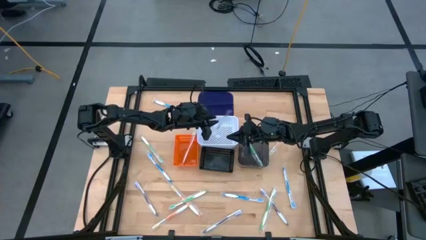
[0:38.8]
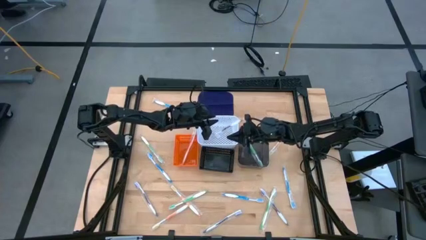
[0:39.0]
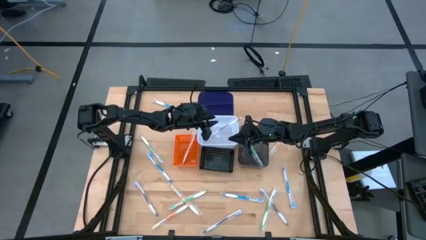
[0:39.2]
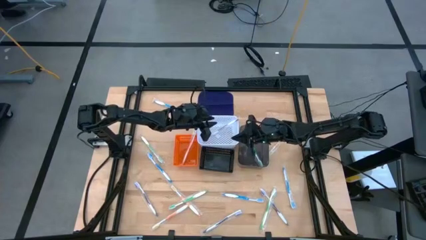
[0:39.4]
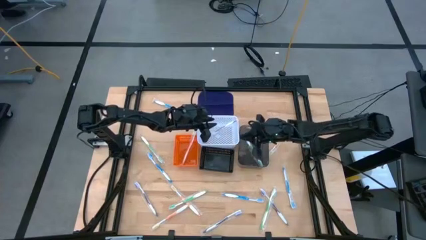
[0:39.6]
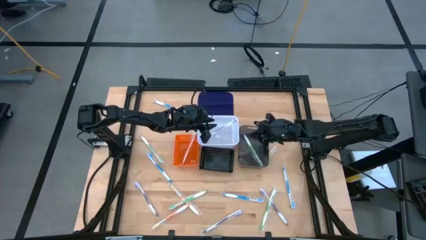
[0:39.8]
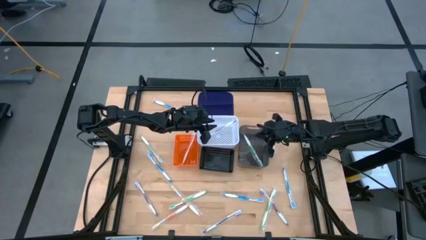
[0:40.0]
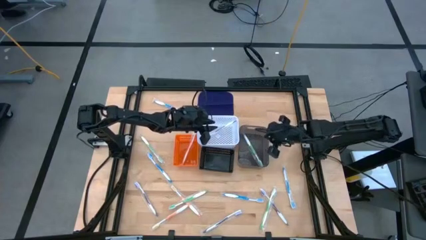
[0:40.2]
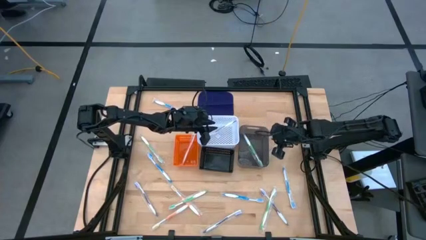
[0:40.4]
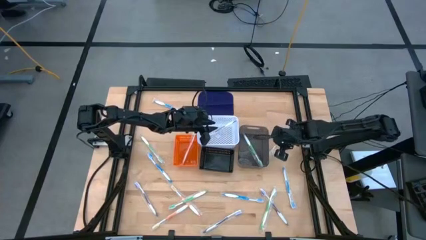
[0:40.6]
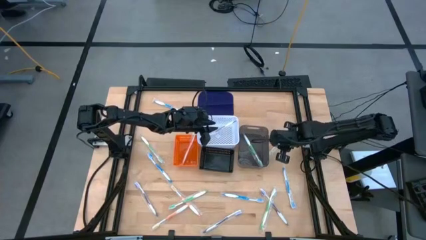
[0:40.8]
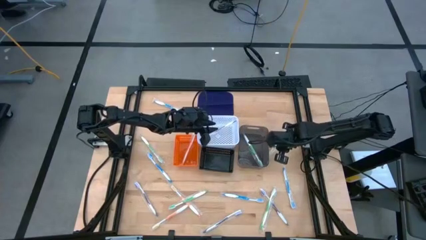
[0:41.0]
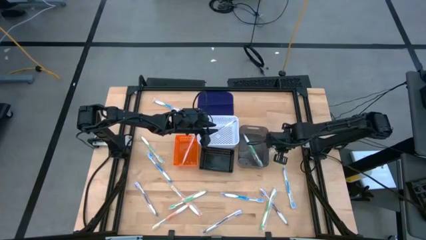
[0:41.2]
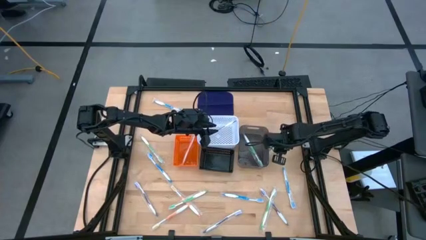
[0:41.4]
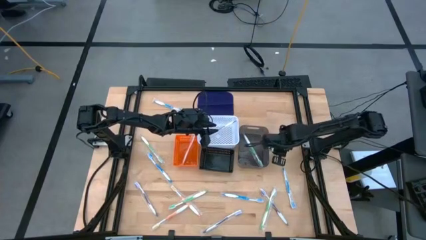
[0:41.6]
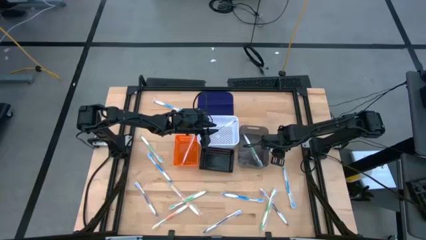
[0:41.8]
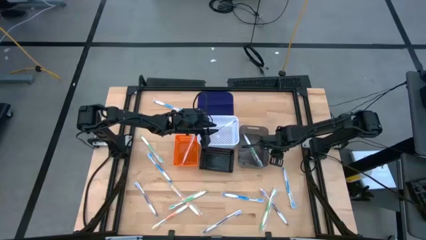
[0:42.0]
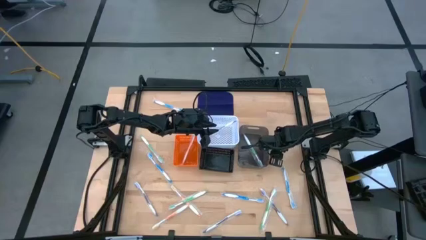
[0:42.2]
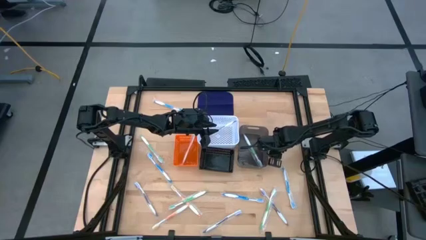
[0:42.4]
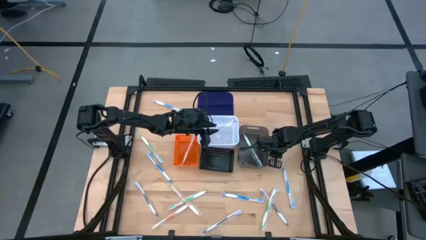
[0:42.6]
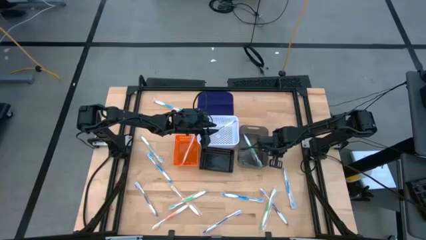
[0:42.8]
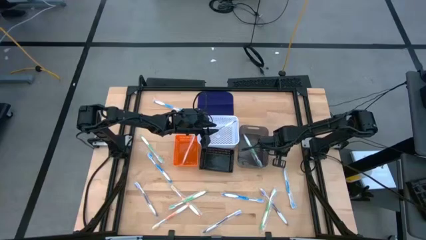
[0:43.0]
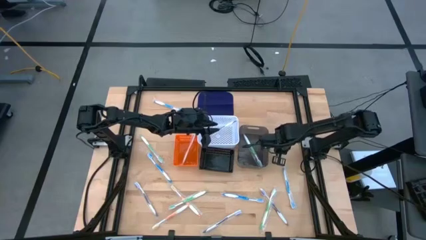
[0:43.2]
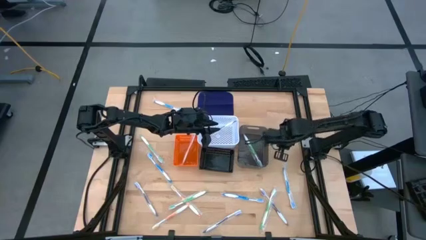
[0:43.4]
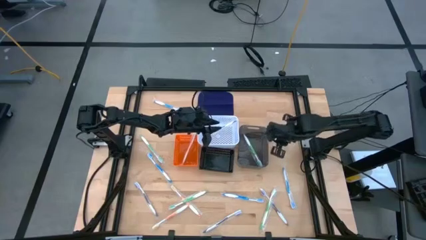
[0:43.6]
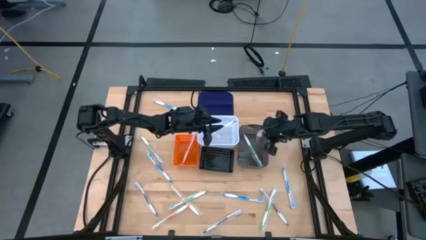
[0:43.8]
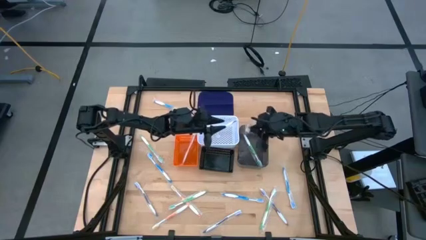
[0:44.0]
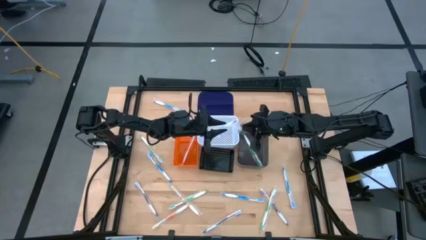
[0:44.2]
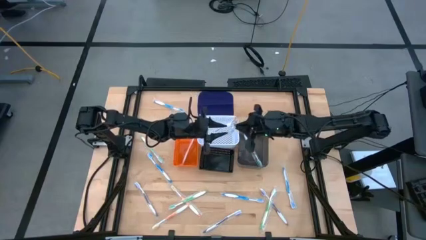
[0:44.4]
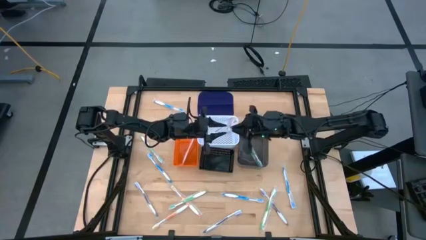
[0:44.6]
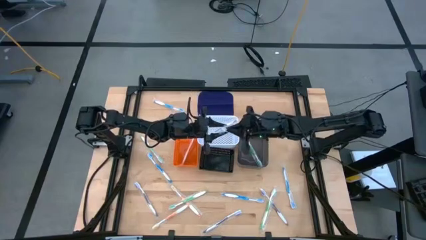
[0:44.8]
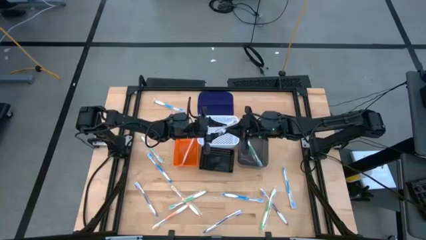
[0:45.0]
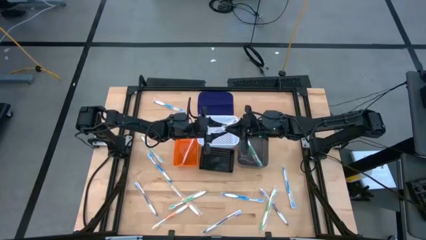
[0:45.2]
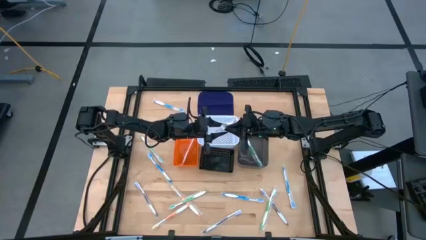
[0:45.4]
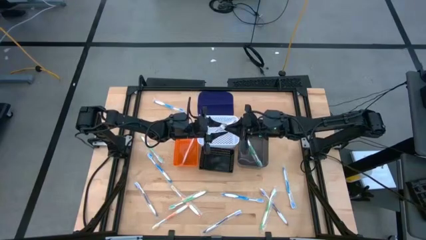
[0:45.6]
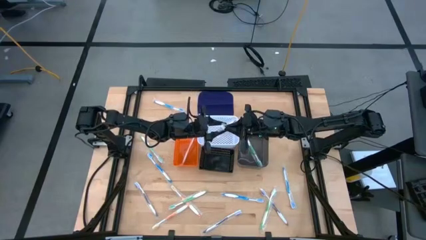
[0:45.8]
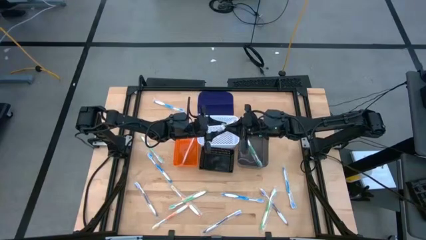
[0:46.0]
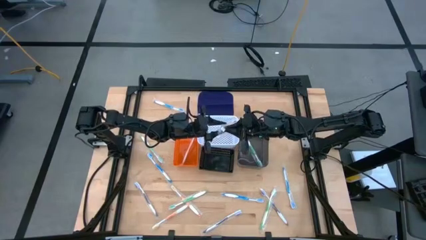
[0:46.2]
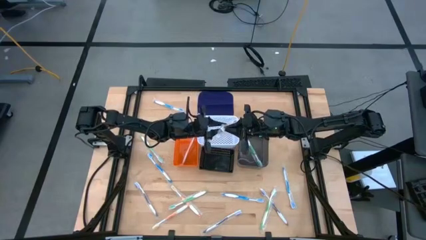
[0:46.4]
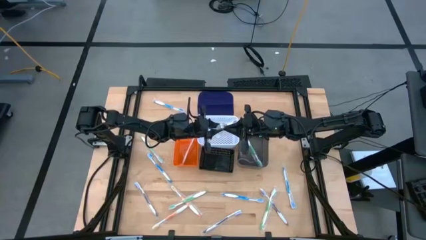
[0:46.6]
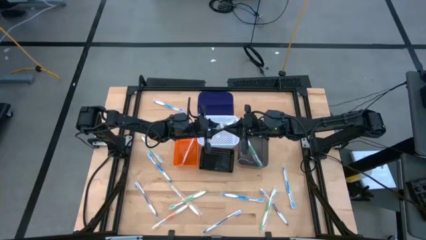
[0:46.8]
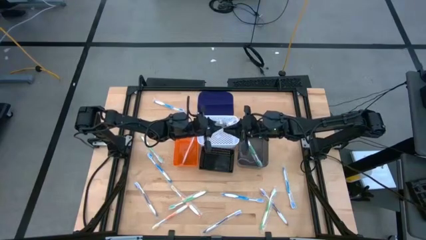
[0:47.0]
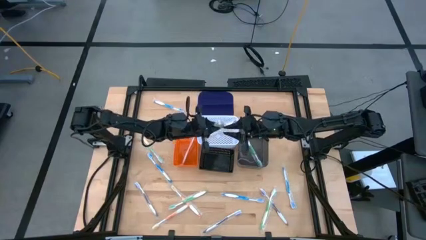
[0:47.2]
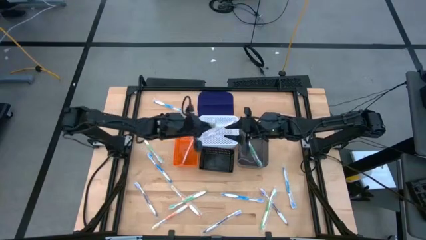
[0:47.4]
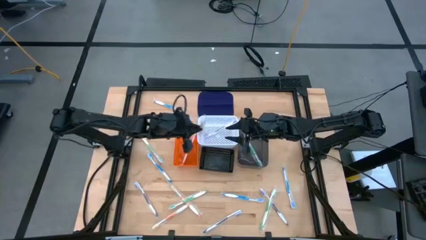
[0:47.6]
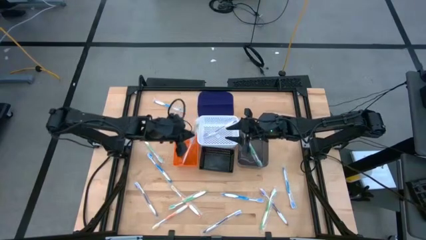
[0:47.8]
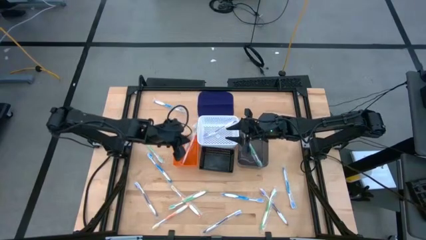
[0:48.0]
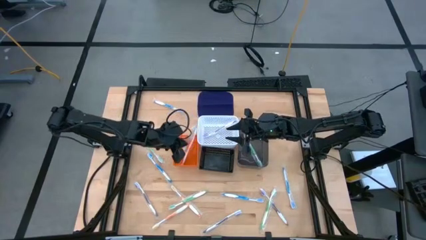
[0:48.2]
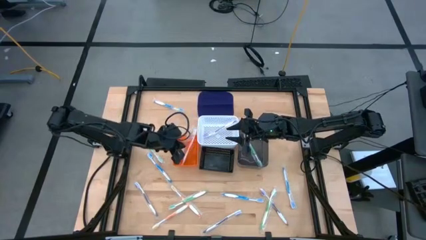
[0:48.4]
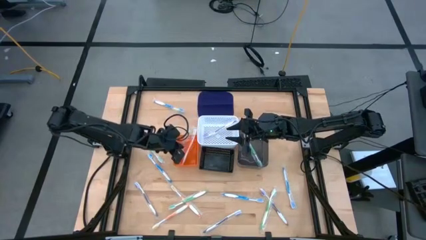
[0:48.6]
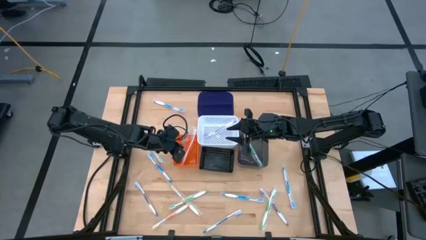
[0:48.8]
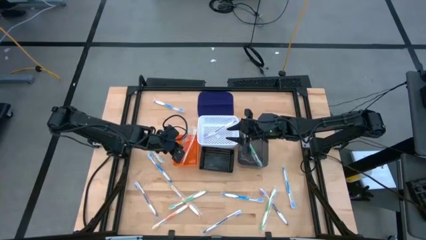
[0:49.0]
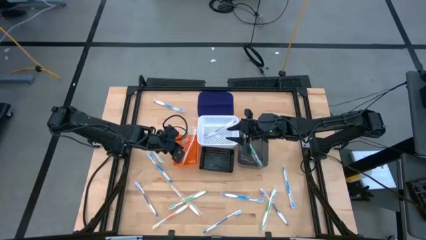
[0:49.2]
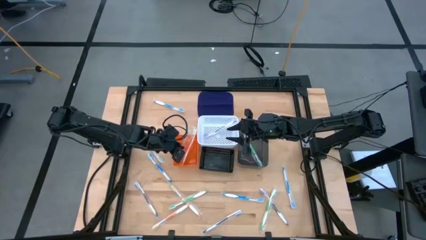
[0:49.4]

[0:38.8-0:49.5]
Task: Pick & Place Toothbrushes
Put the orange toothbrush into the orange basket

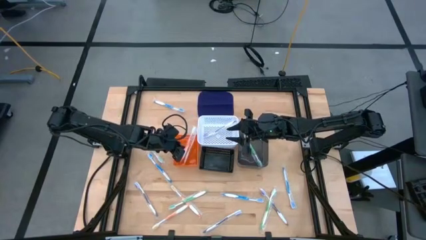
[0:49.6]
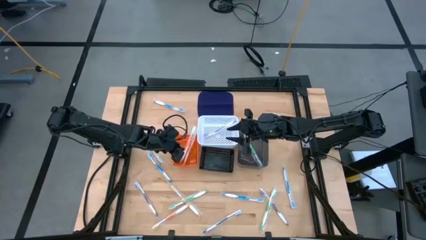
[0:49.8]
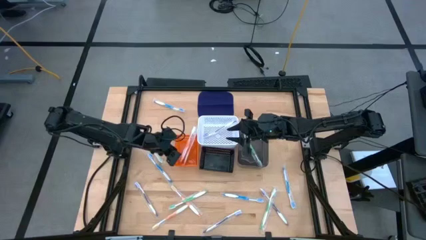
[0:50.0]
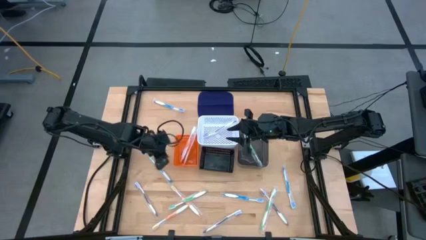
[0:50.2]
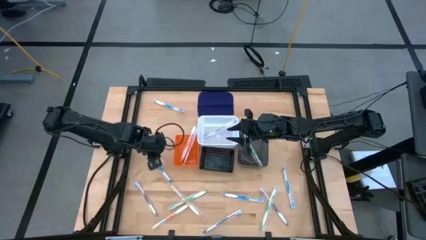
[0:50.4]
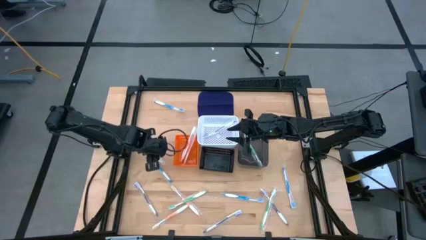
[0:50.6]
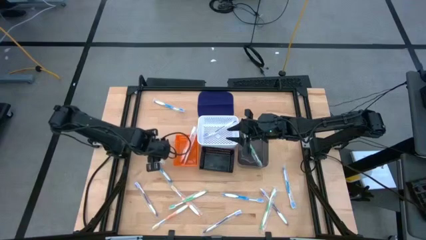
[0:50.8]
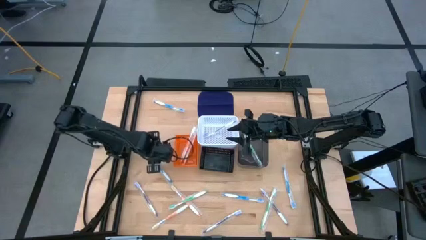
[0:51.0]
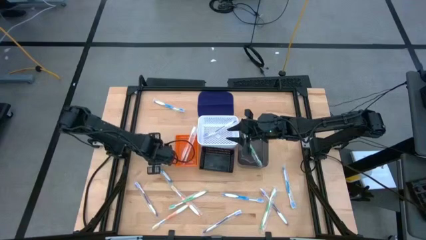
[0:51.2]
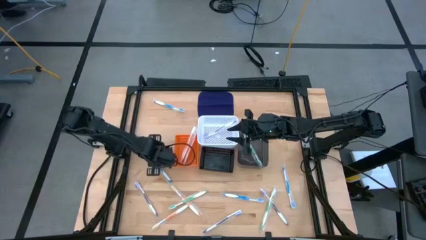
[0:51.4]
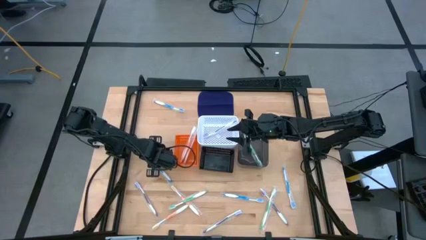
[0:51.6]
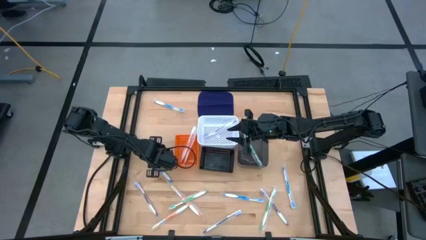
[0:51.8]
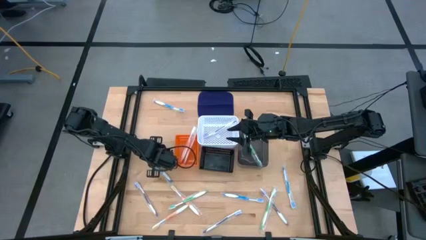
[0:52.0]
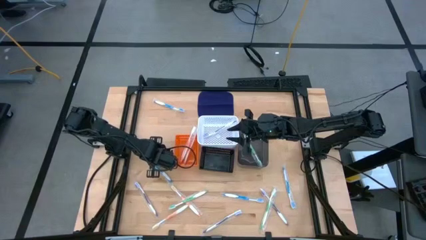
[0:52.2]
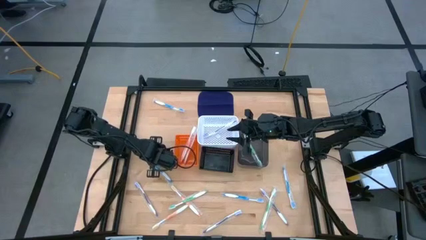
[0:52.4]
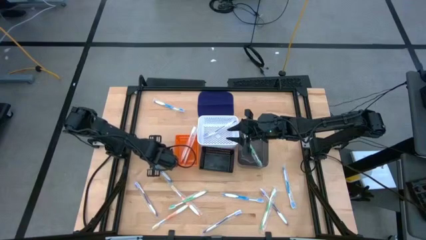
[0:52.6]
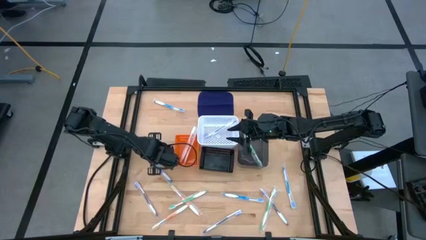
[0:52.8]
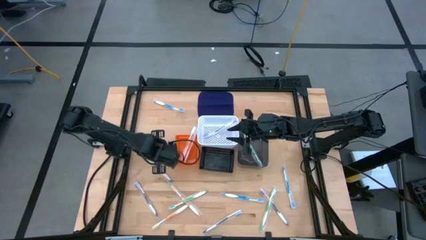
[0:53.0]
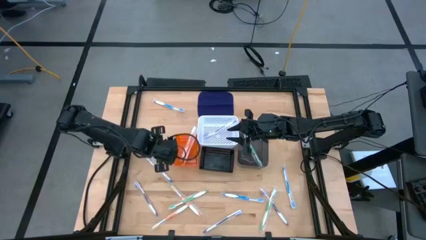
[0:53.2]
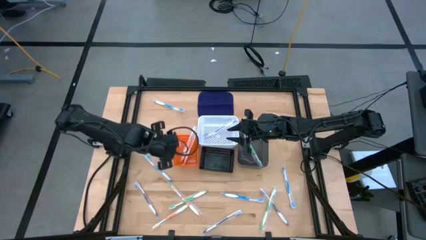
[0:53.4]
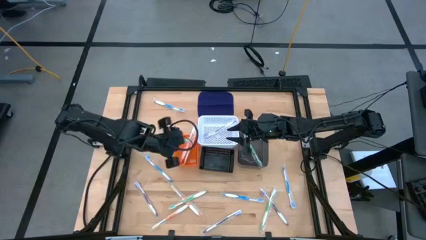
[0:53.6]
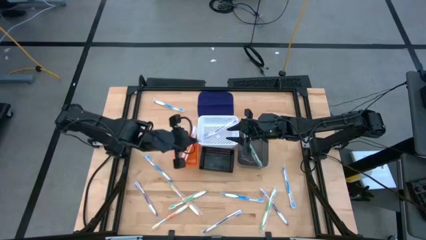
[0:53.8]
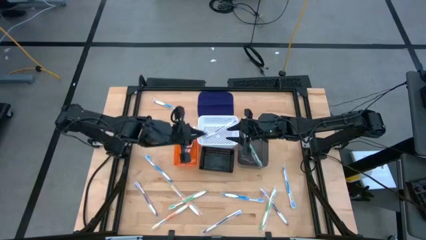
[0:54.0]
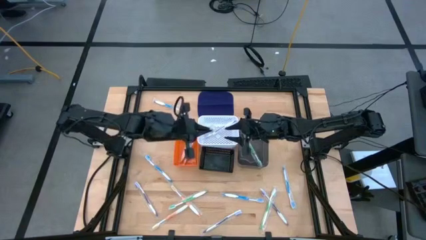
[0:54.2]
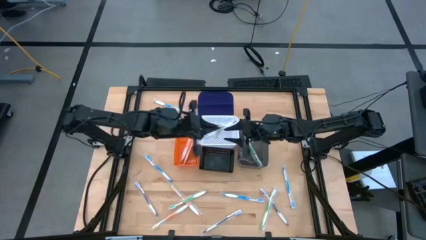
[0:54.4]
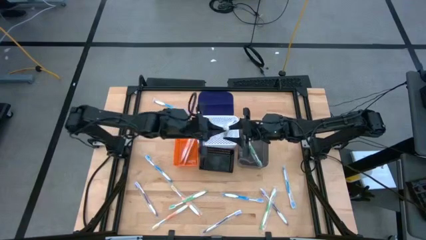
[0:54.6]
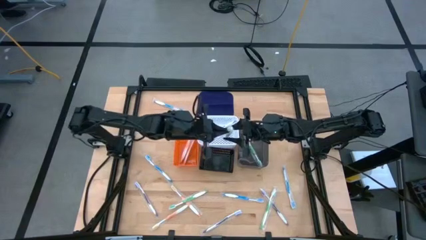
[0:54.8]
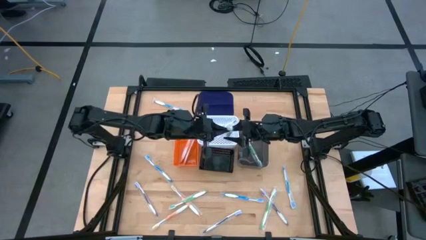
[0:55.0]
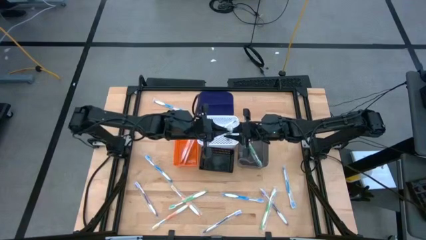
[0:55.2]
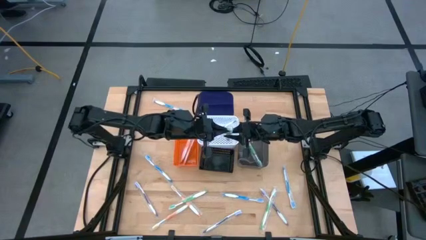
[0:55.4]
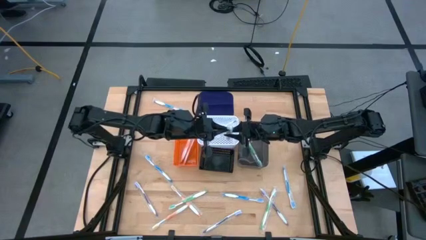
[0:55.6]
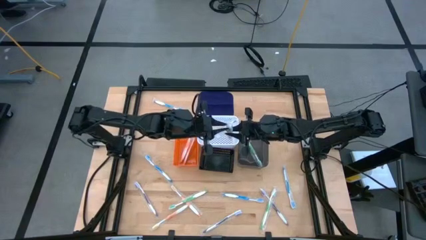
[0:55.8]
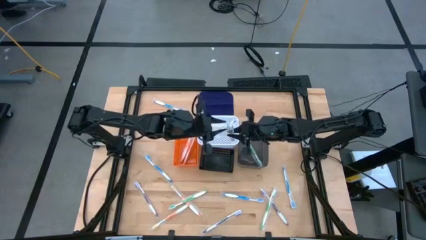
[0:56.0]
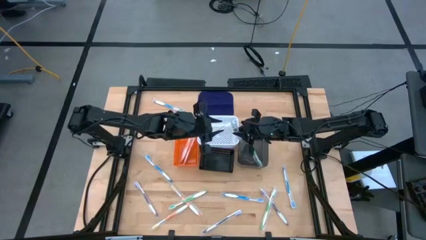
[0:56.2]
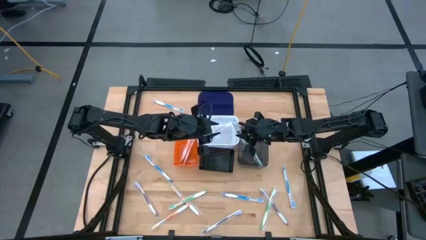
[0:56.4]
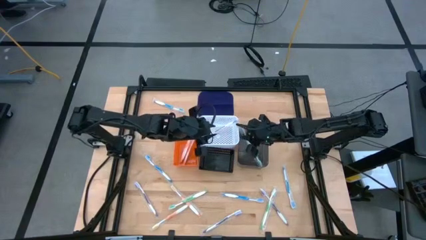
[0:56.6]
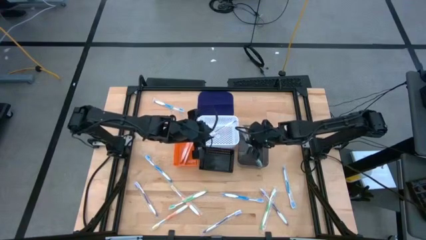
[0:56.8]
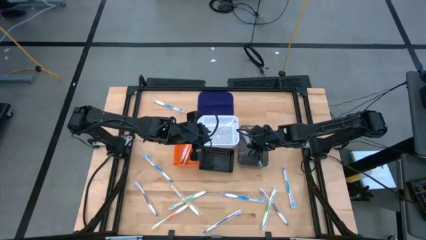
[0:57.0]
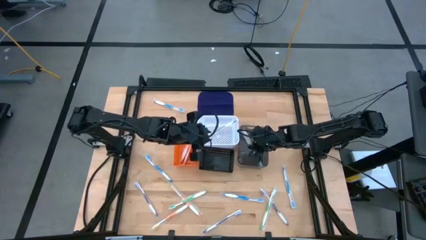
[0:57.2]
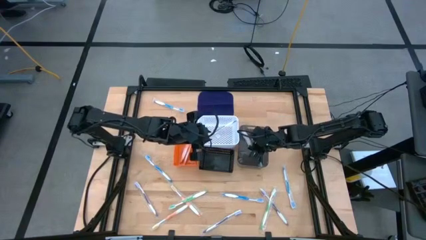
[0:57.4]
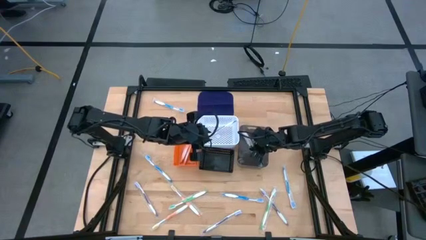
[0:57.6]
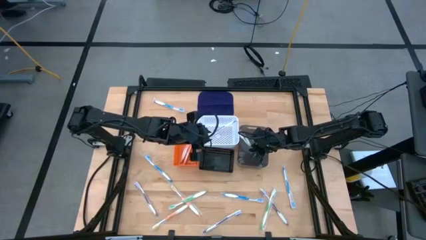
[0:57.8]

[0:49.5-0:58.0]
Put the green toothbrush into the black bin
